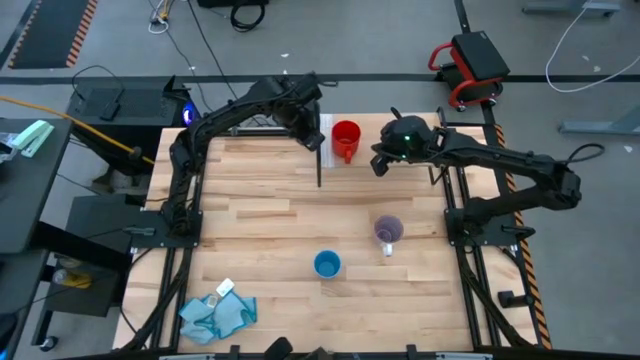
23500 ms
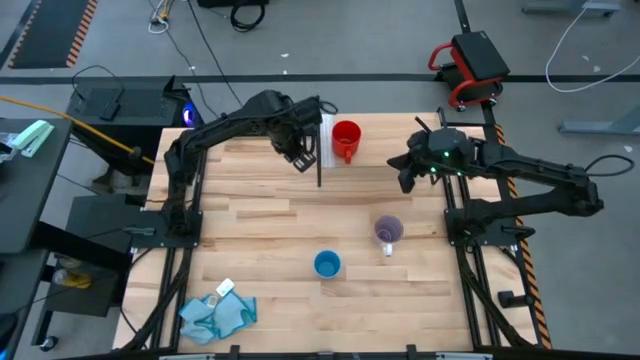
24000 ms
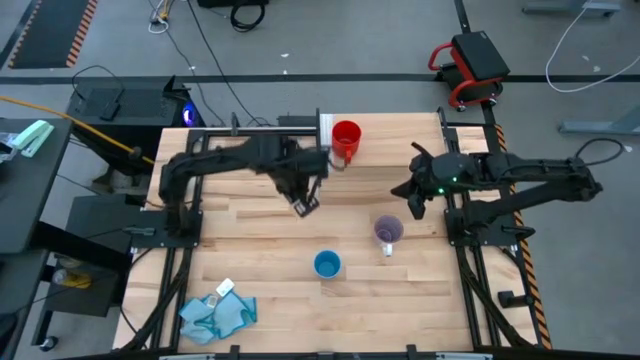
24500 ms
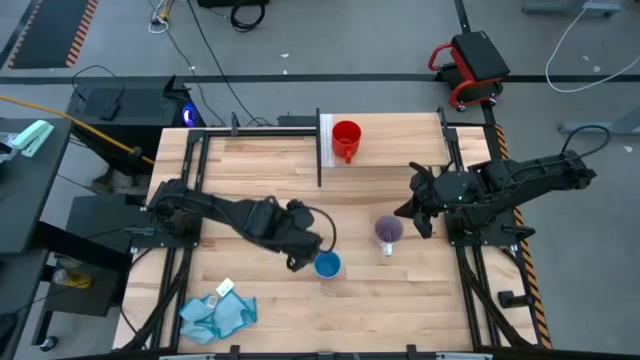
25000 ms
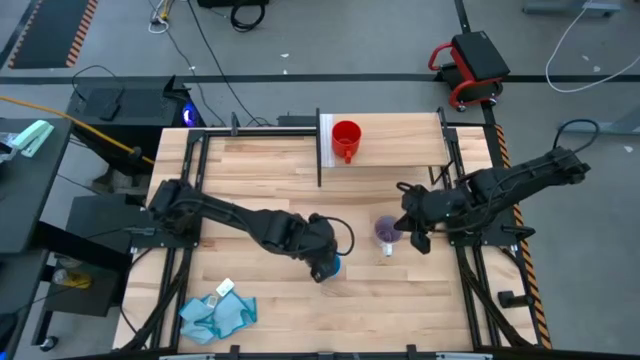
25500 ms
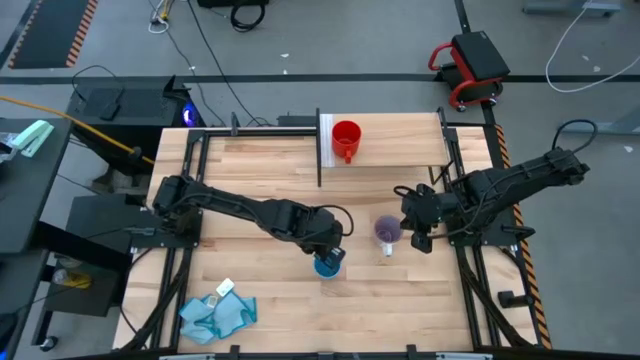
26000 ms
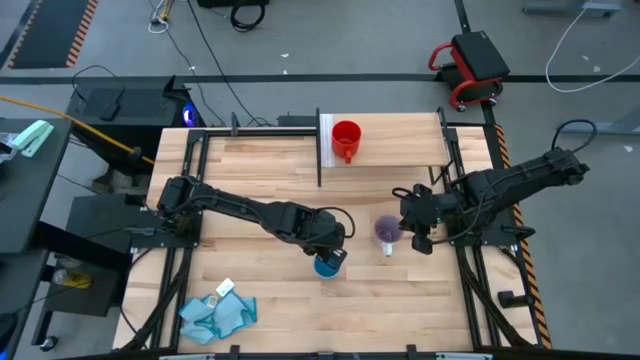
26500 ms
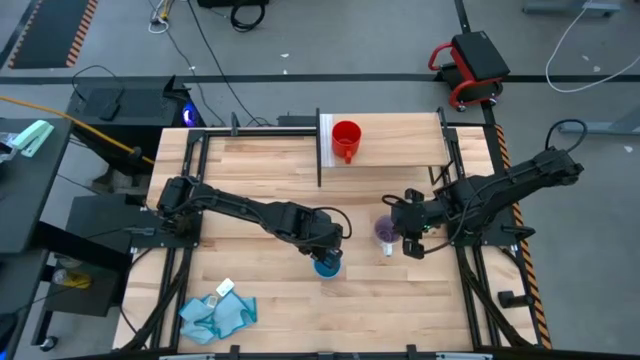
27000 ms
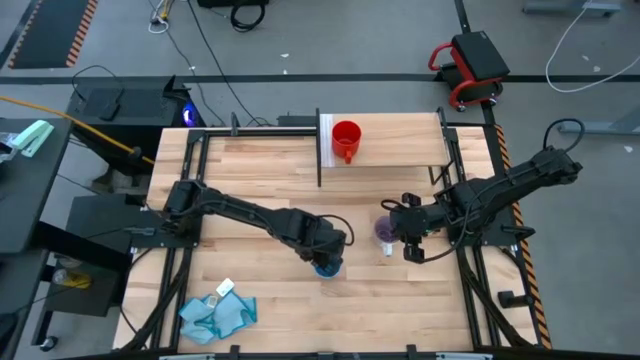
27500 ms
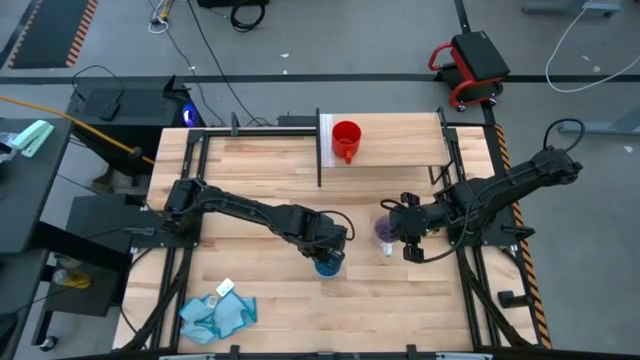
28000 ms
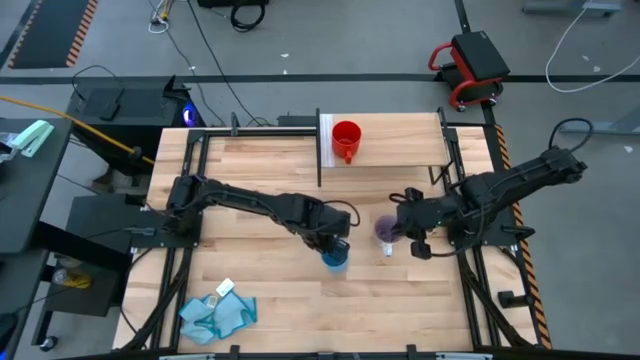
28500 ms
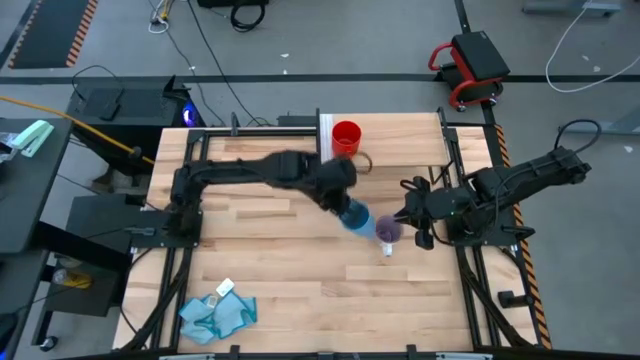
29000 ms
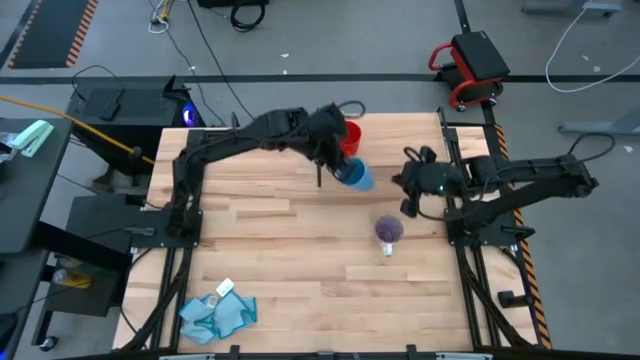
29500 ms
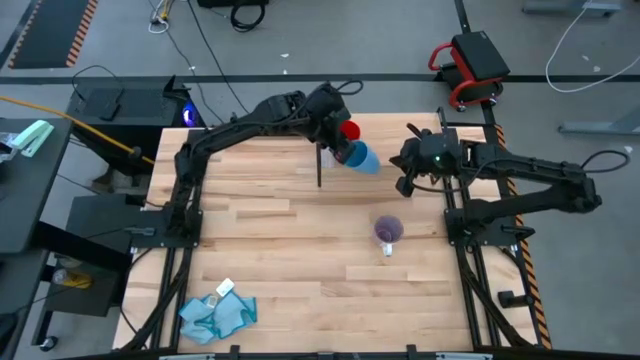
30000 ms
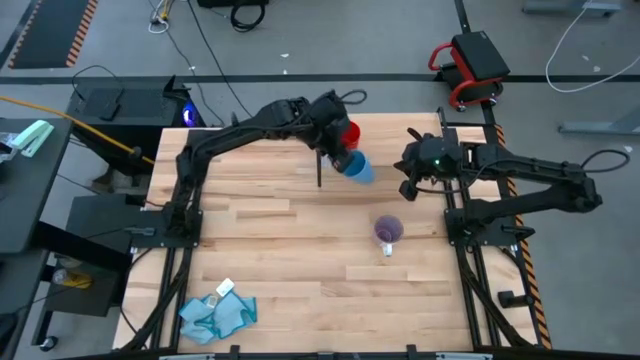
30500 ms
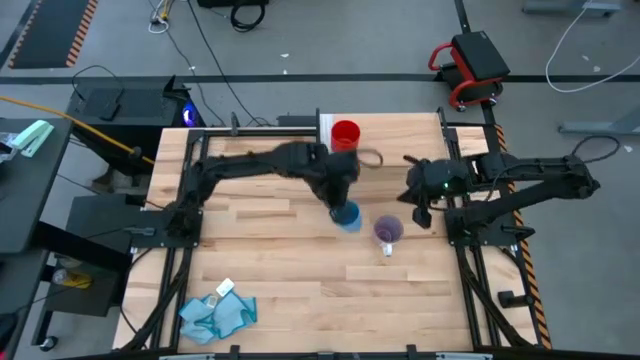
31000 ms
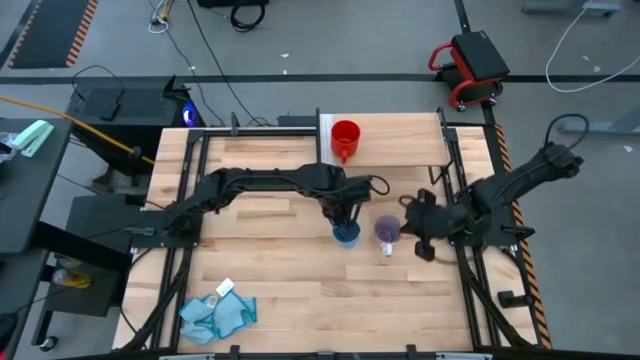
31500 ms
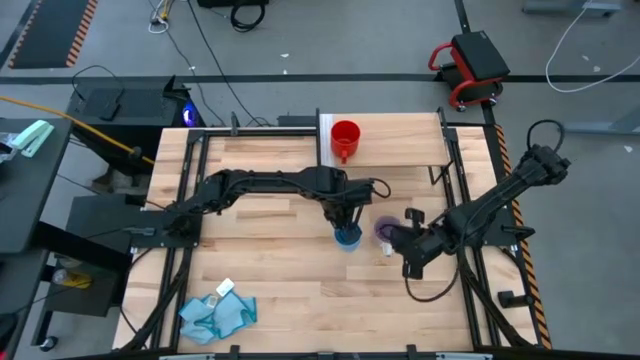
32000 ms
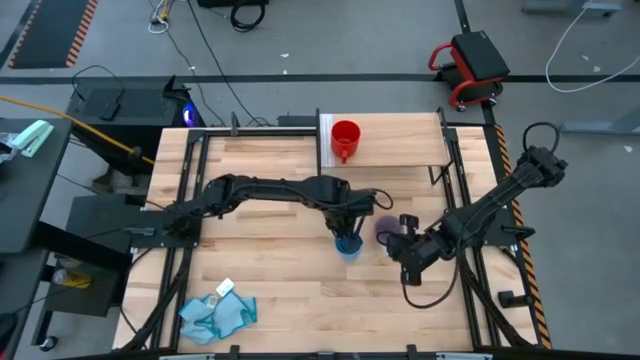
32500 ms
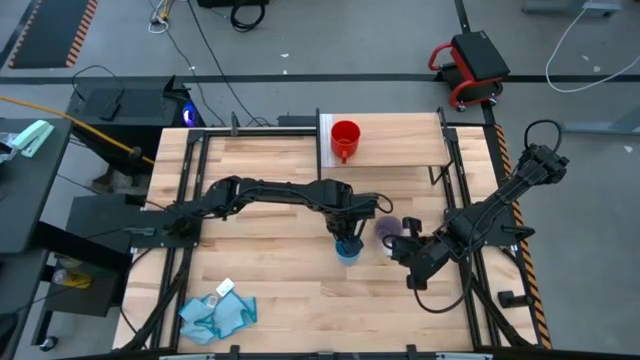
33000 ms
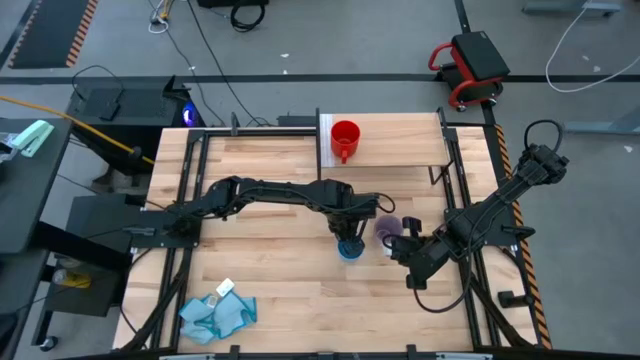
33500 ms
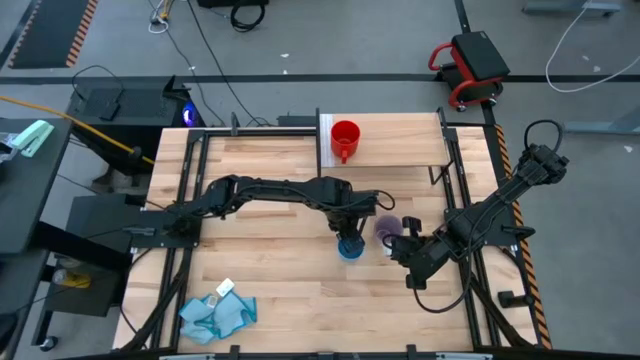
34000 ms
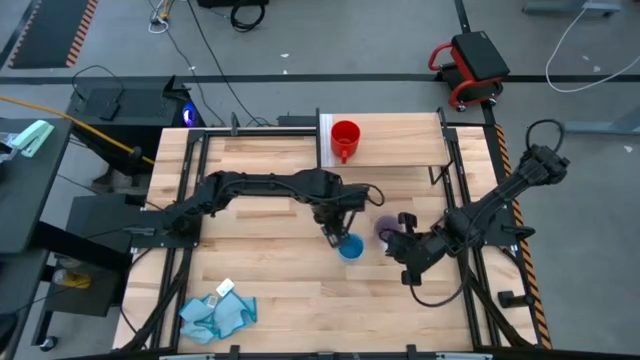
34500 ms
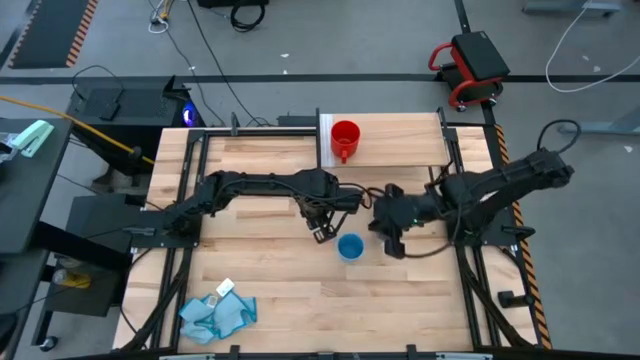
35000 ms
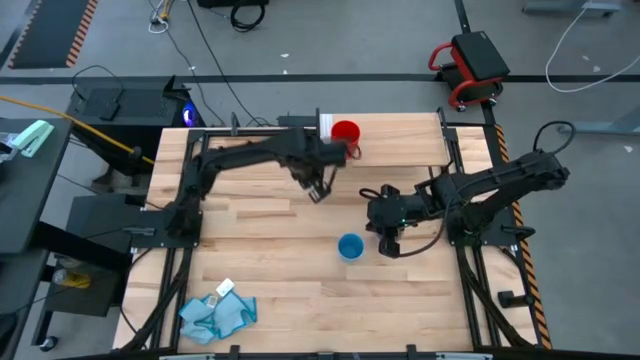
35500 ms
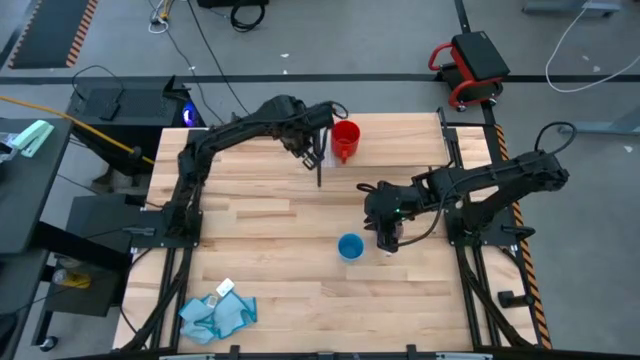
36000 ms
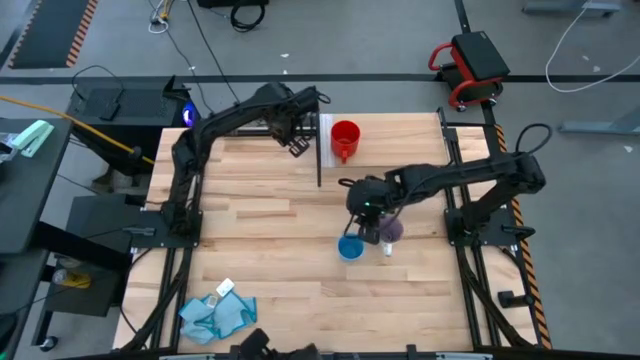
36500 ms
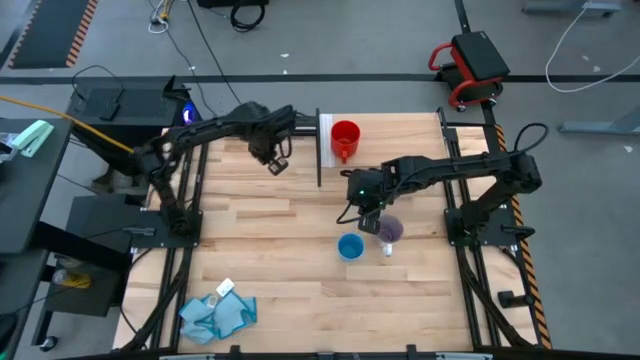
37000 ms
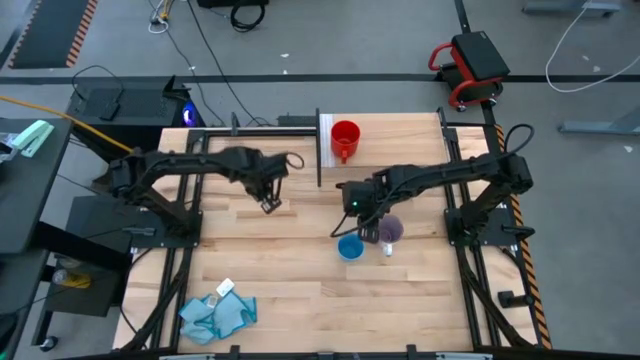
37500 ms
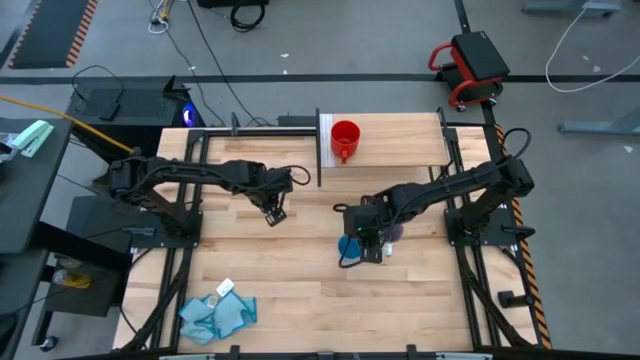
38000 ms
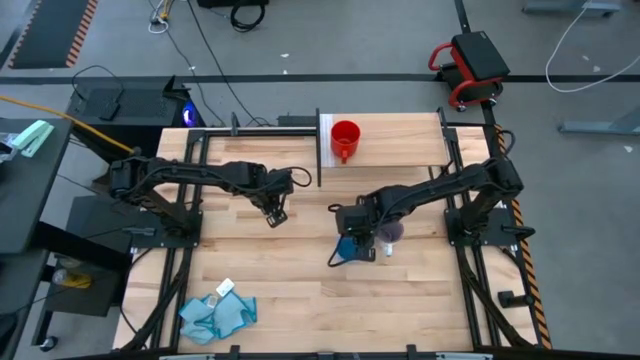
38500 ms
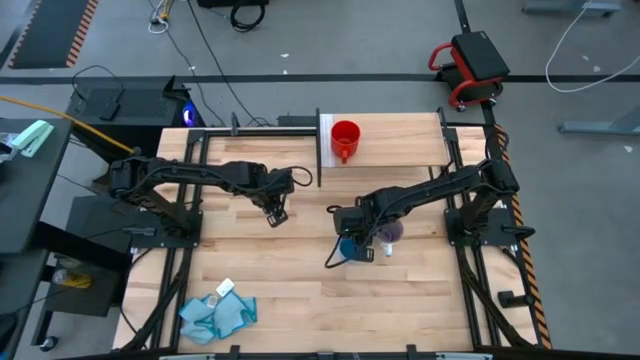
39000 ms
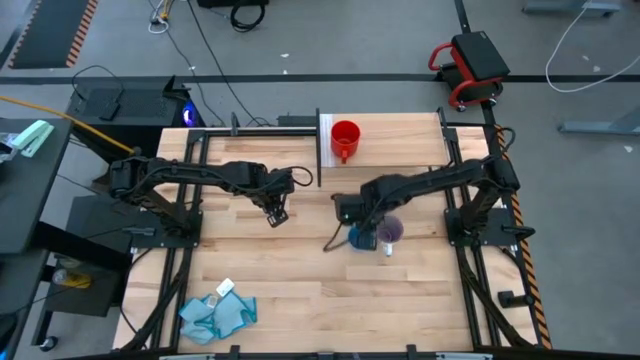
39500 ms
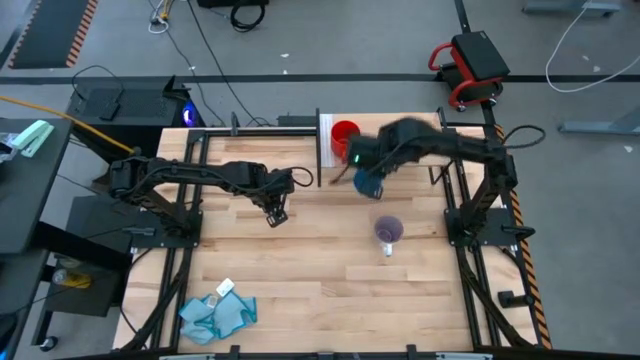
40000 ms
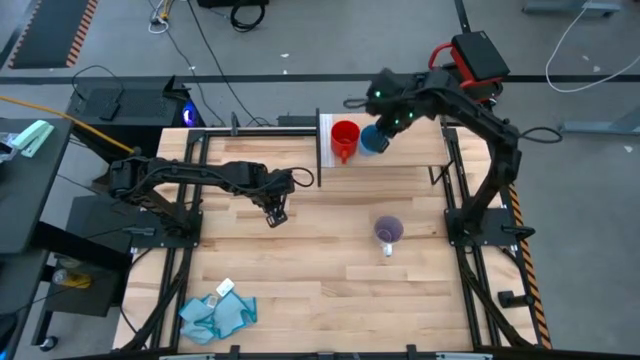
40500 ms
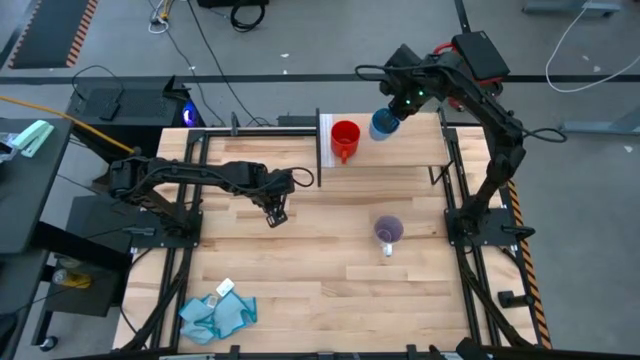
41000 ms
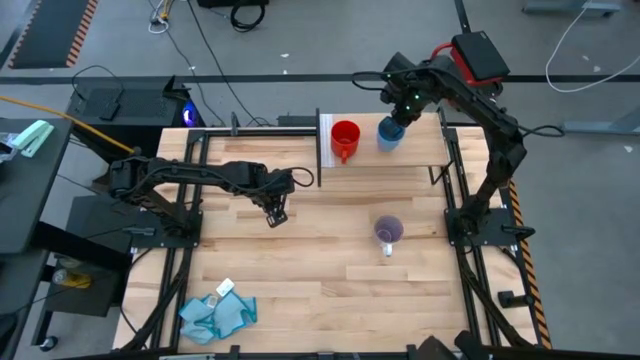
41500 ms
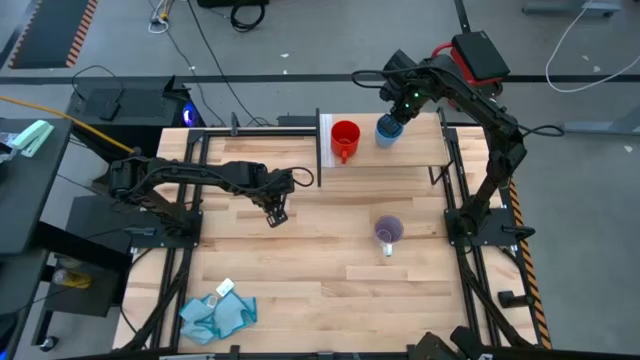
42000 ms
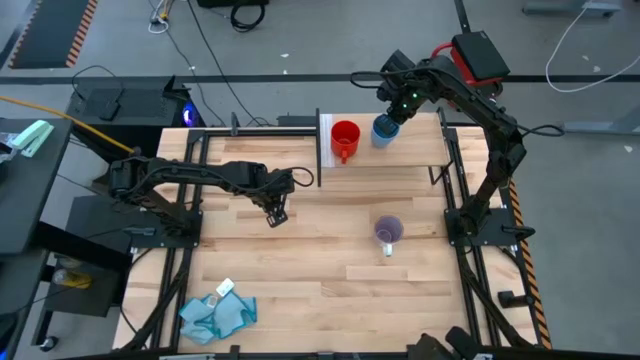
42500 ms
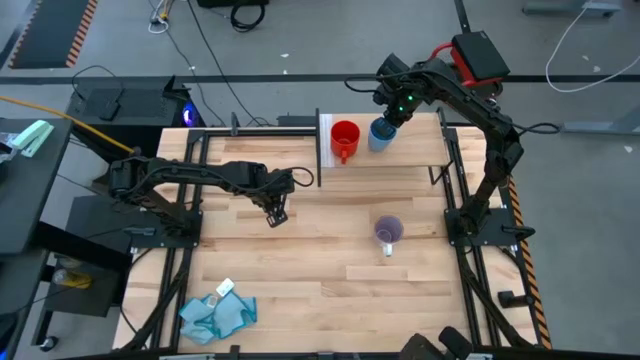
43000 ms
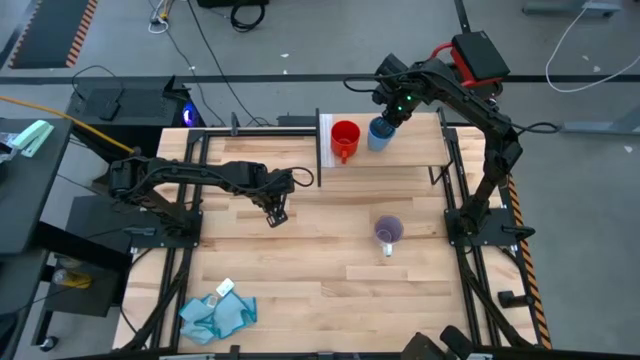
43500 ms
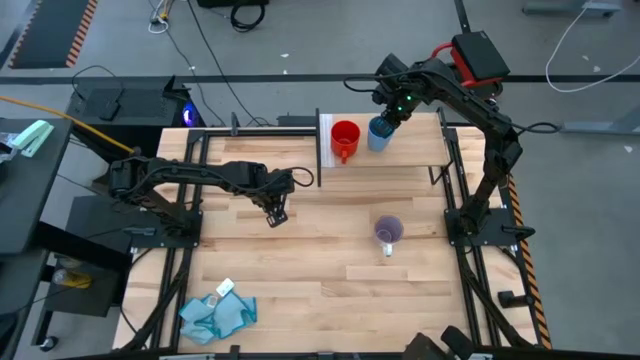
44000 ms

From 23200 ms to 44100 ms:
Task: Stack small to large cups/mugs on shelf
Put the blue cup on the shelf
